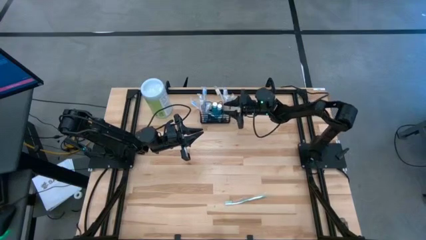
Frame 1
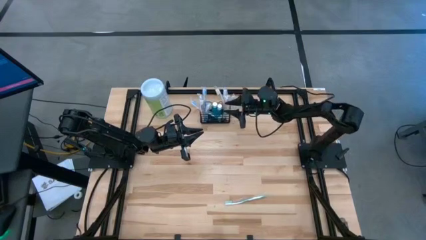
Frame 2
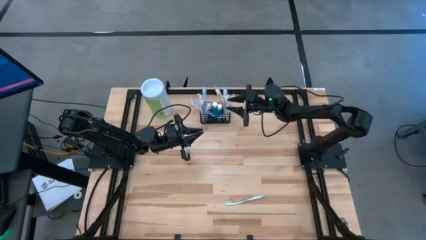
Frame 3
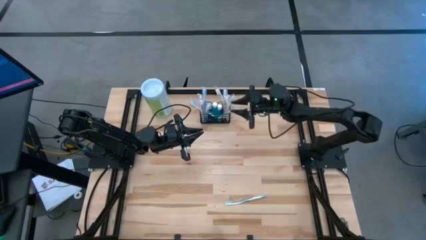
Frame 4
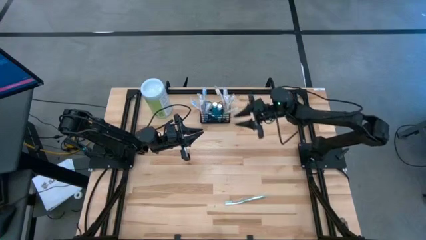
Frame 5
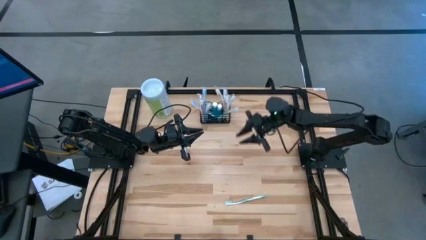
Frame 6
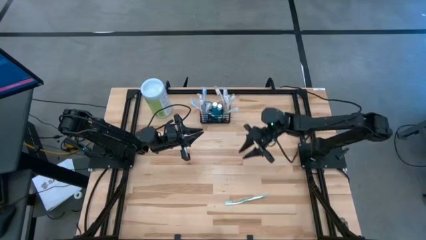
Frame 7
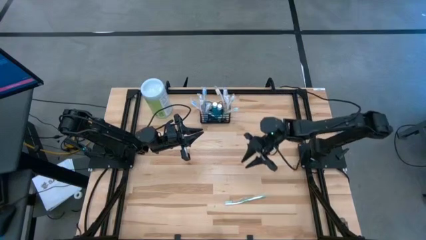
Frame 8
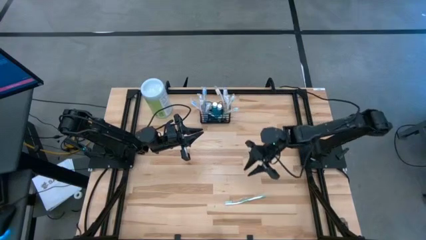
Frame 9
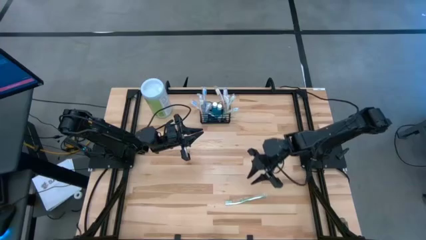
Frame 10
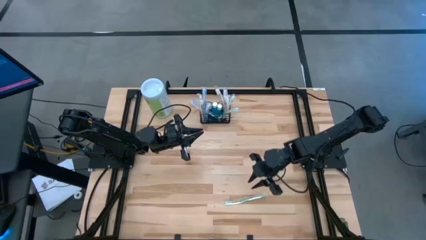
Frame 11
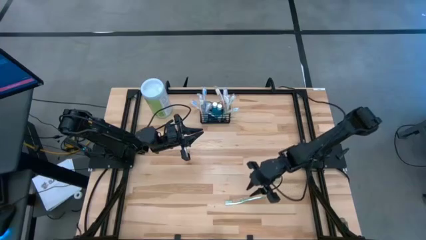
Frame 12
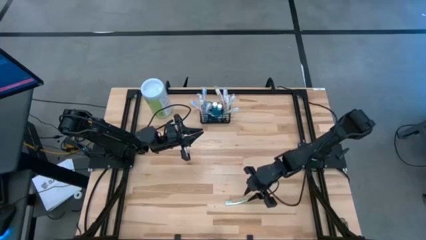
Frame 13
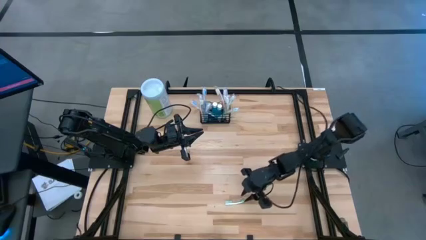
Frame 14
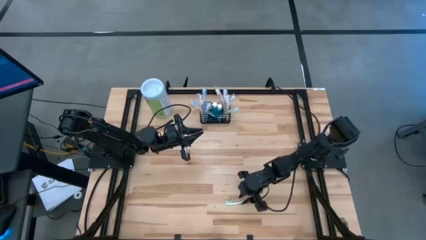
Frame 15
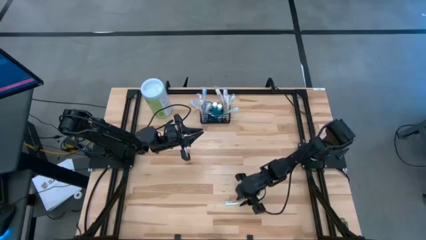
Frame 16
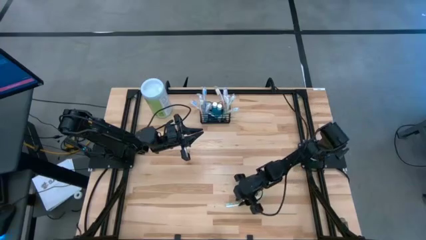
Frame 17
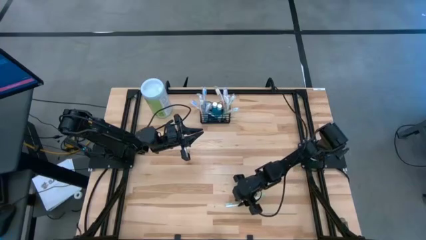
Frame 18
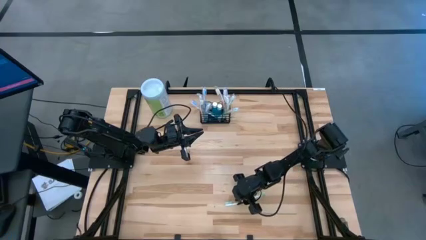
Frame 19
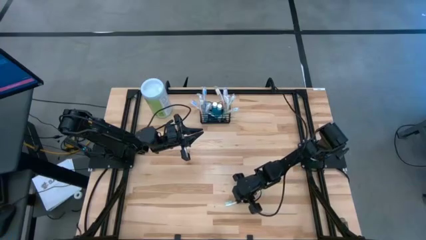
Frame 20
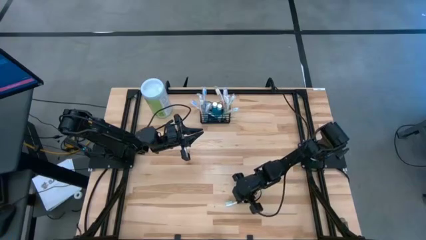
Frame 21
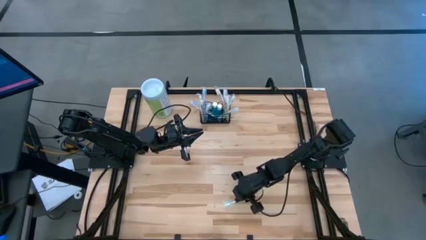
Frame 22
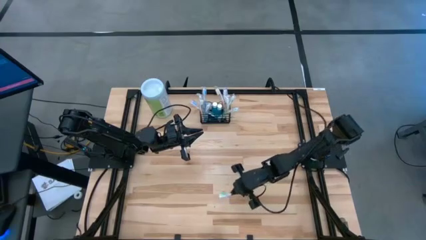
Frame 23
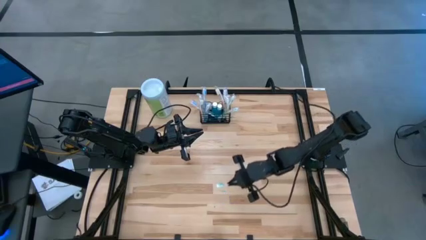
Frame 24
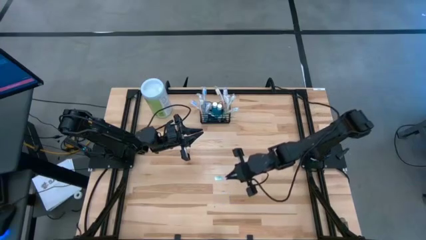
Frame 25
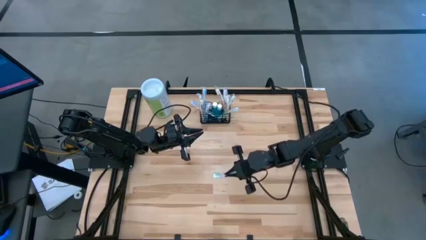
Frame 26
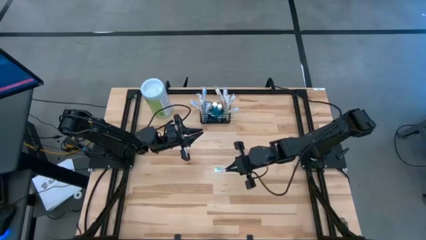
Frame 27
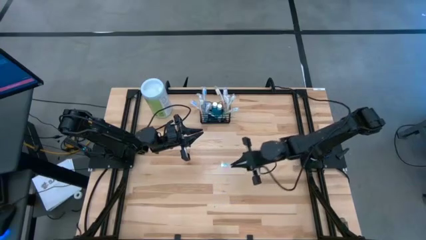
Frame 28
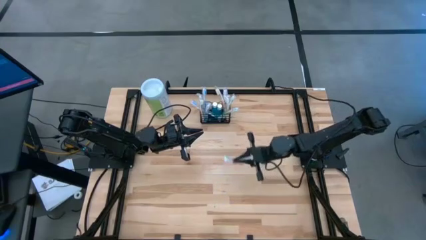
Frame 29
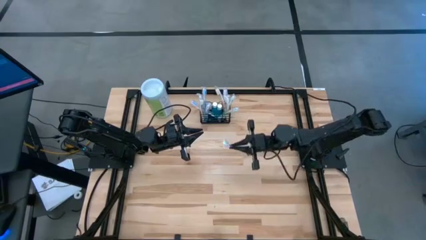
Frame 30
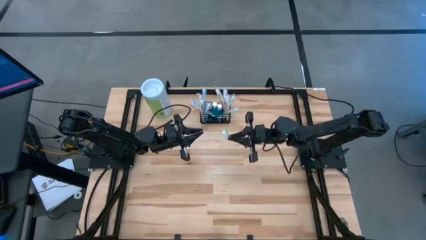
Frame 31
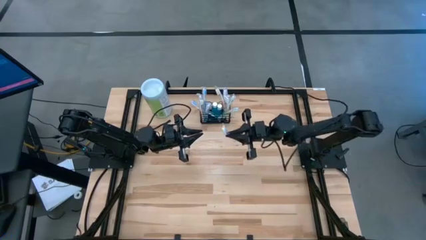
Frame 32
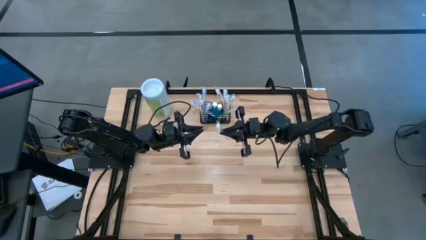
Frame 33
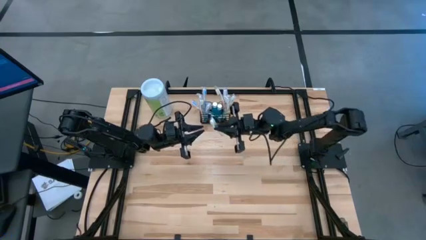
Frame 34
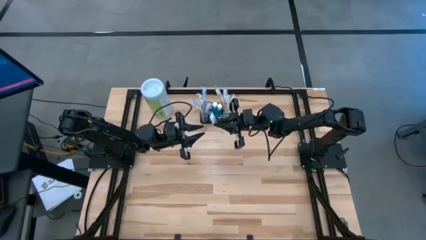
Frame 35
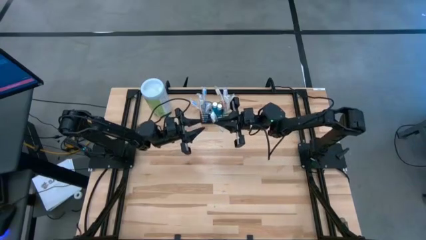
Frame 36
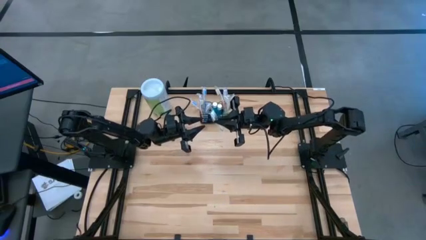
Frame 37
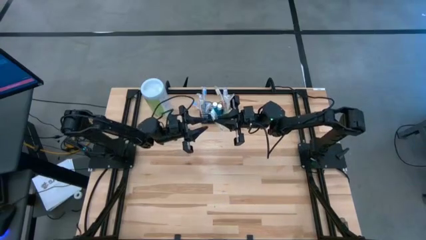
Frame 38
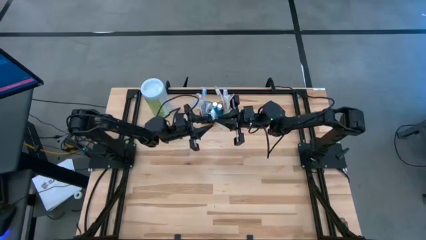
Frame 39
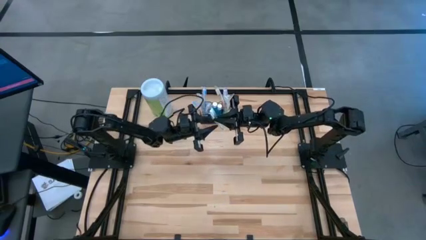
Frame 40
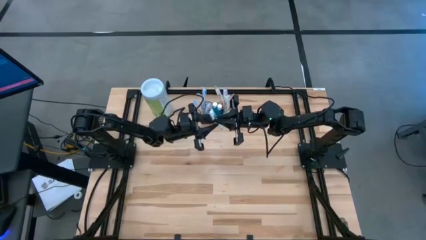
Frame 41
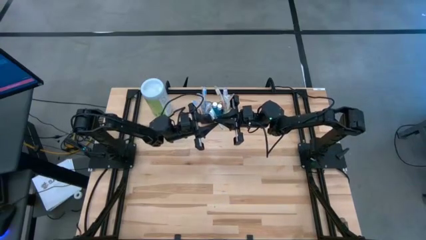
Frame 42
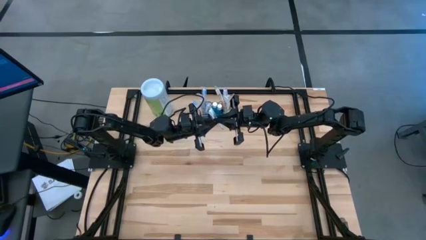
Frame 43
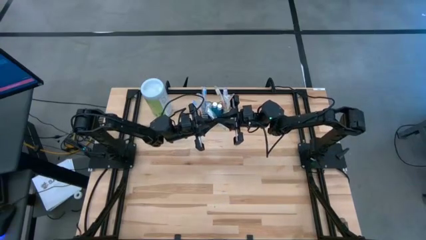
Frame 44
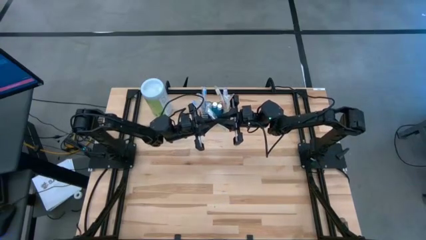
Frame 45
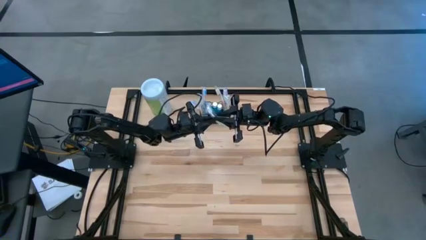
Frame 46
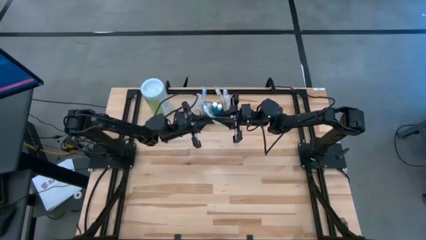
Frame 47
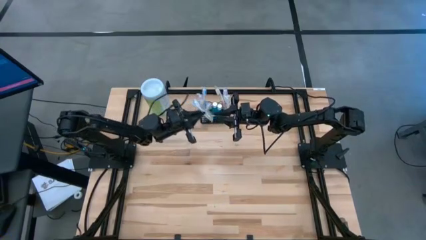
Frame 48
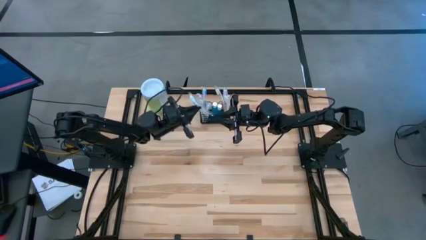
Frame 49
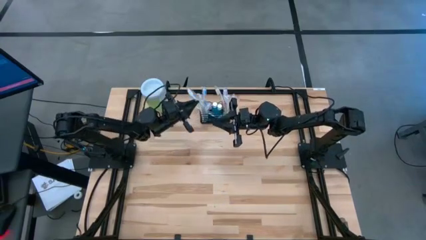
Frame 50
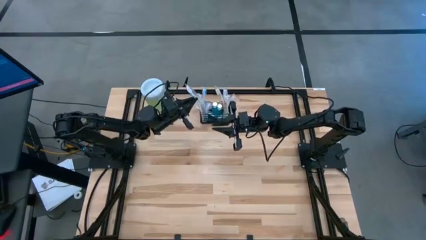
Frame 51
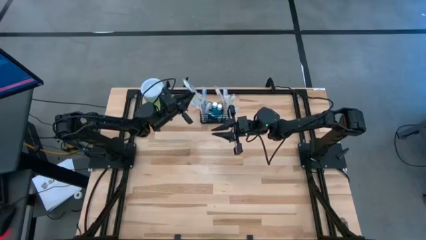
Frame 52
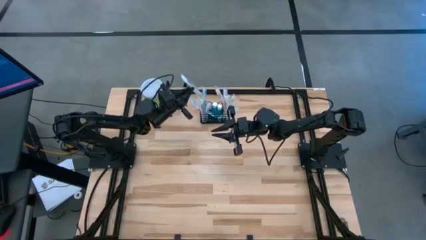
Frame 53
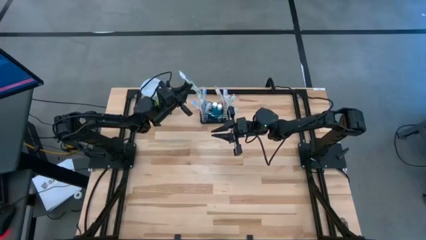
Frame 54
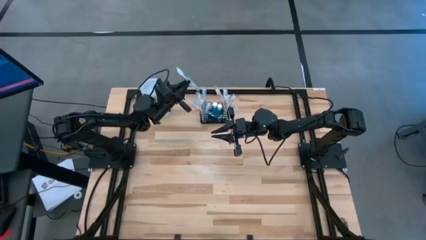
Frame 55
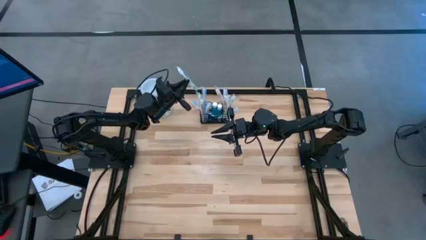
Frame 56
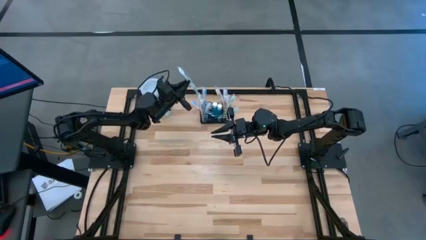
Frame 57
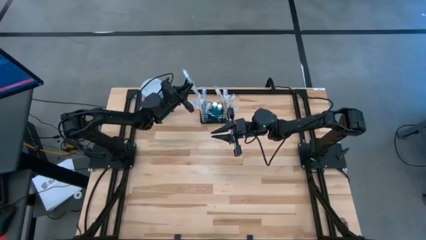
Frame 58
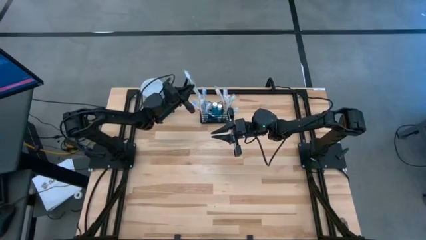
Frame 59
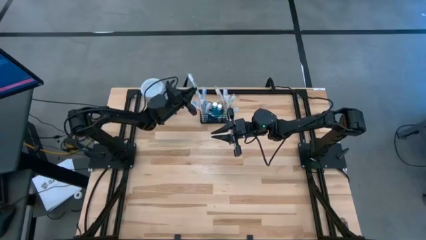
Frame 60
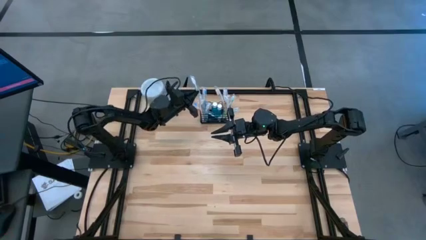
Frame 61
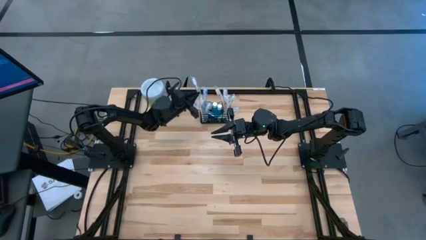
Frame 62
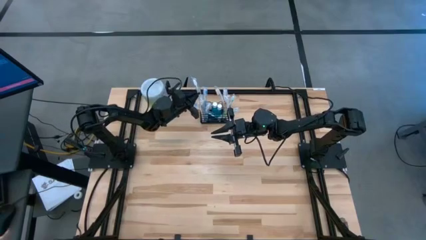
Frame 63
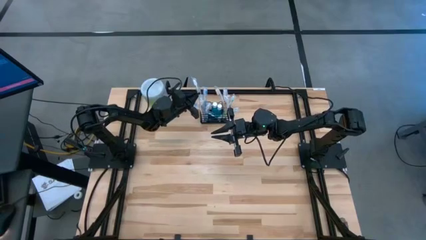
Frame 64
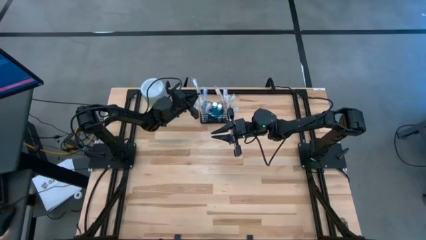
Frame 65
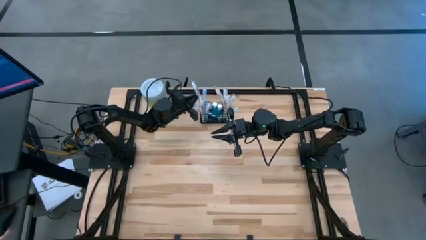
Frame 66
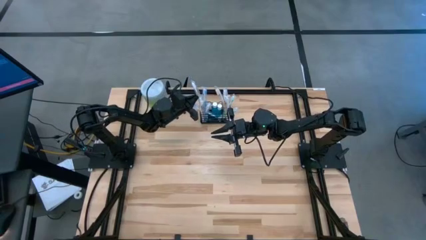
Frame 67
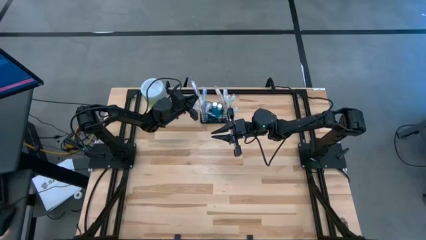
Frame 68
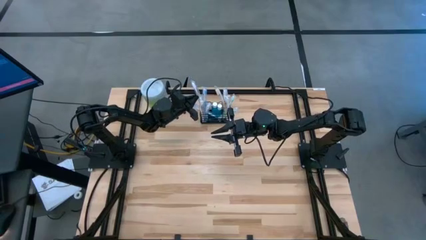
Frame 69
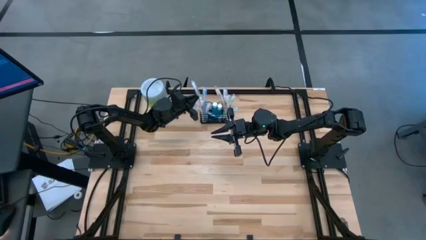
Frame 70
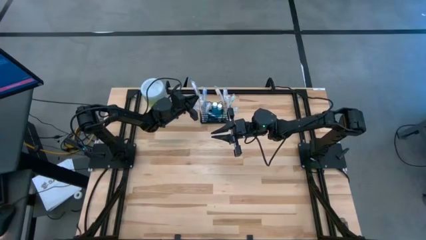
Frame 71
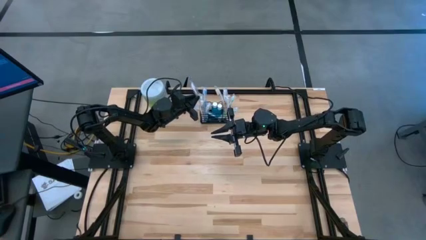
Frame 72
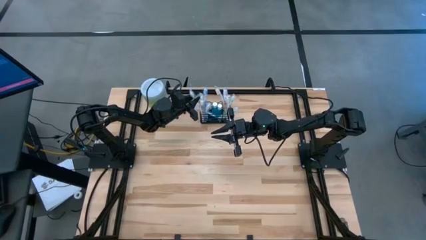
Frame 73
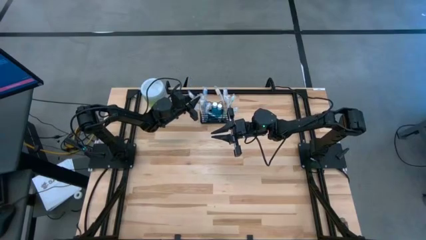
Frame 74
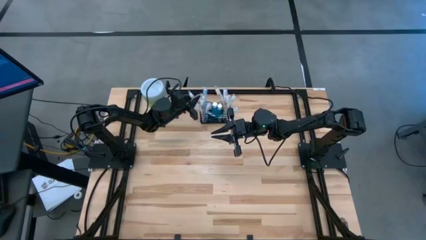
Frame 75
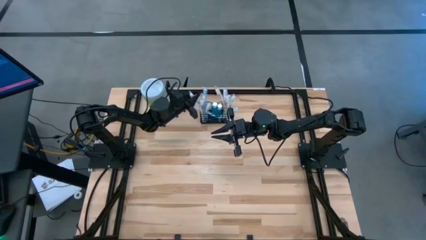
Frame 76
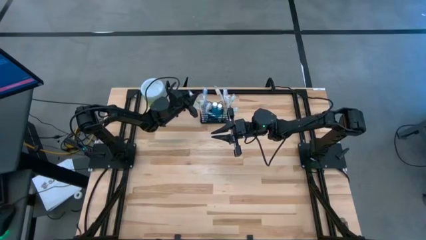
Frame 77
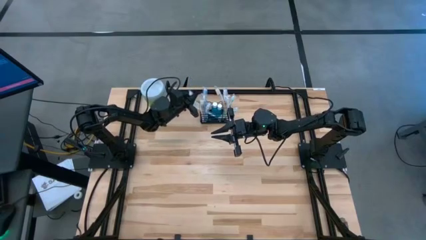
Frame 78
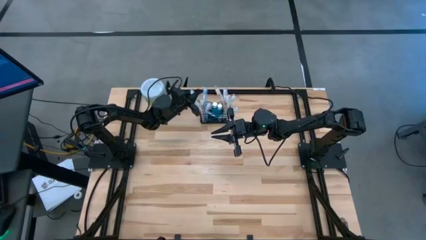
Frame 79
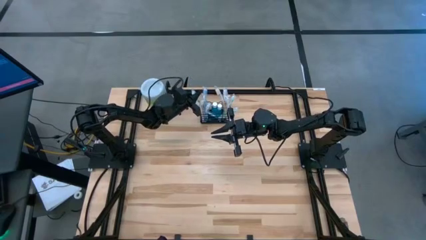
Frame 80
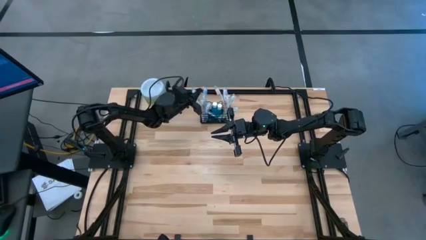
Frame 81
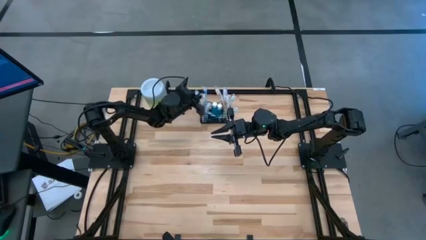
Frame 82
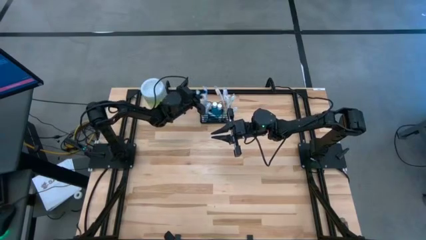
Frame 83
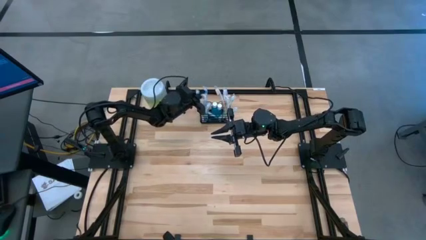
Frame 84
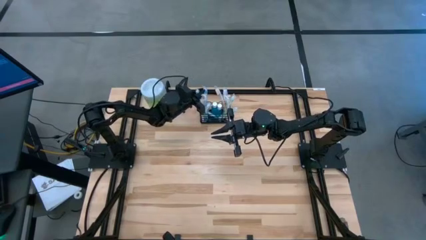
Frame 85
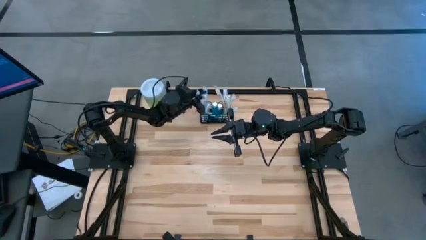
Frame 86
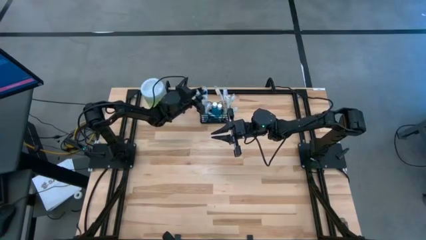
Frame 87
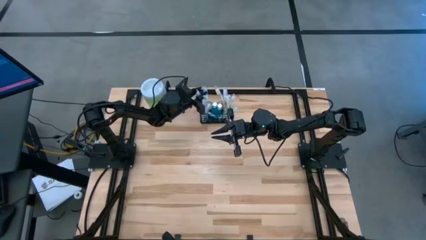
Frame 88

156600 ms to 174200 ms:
Task: Pick & Place toothbrushing station
Put the green toothbrush into the black wire organizer
